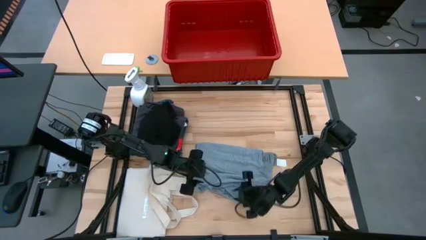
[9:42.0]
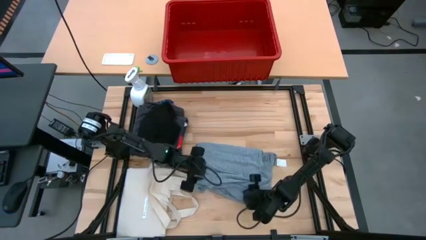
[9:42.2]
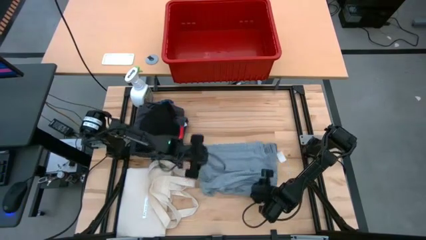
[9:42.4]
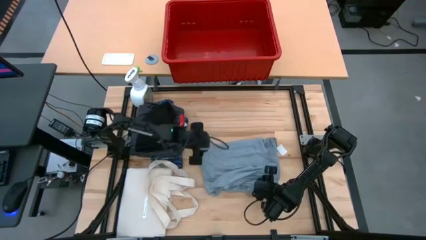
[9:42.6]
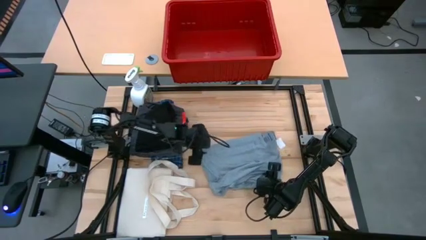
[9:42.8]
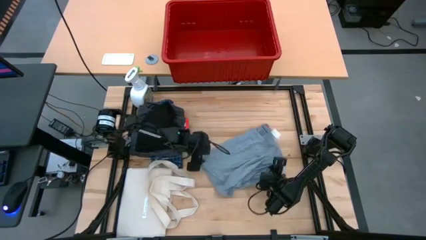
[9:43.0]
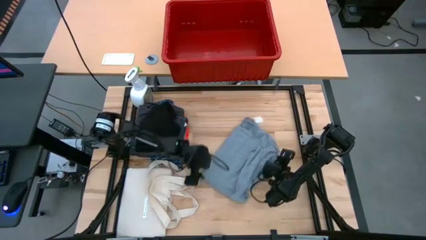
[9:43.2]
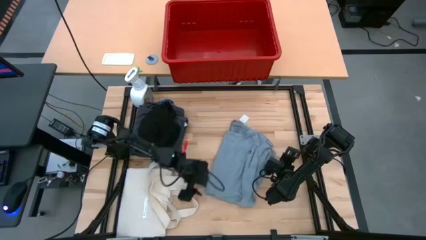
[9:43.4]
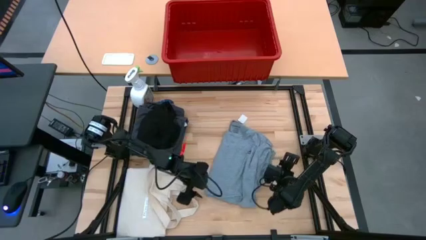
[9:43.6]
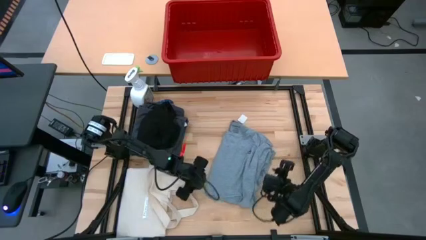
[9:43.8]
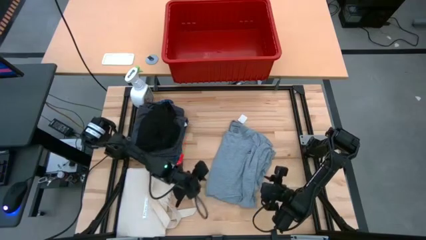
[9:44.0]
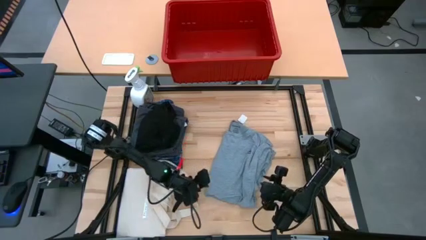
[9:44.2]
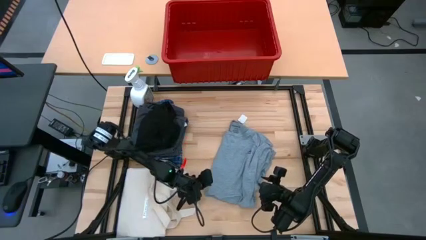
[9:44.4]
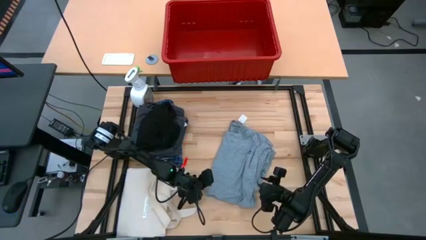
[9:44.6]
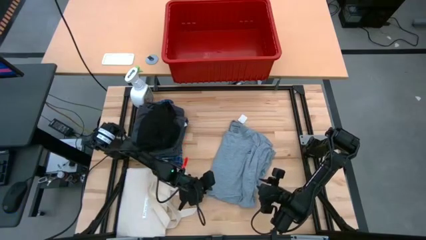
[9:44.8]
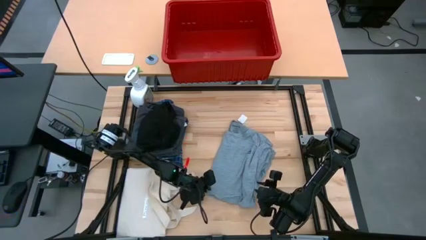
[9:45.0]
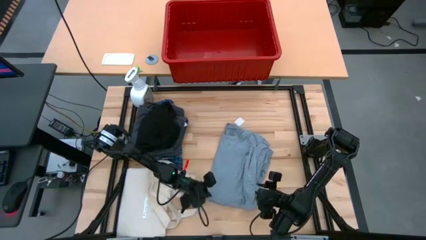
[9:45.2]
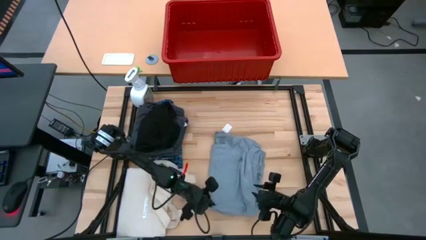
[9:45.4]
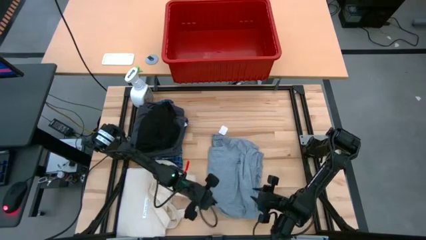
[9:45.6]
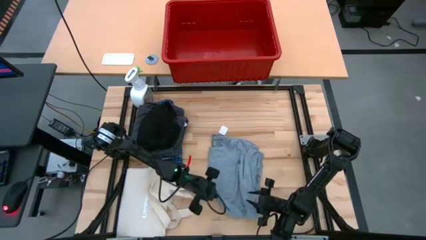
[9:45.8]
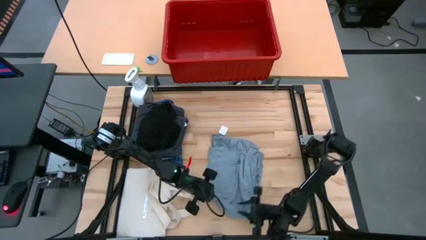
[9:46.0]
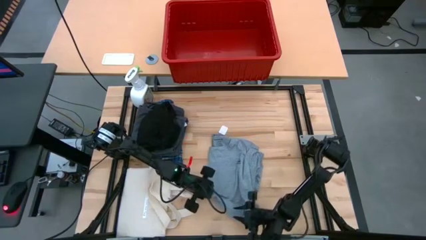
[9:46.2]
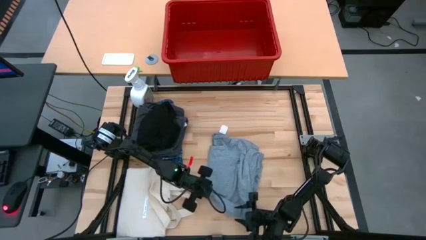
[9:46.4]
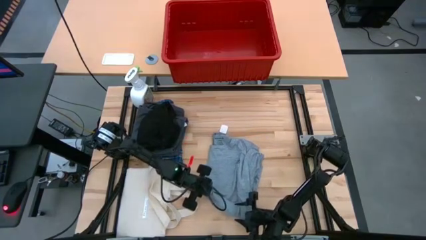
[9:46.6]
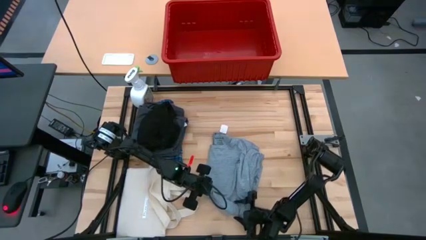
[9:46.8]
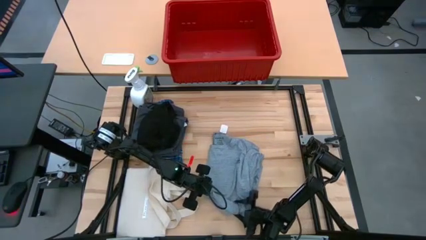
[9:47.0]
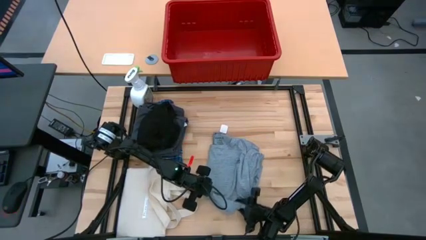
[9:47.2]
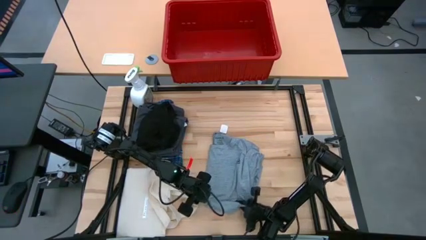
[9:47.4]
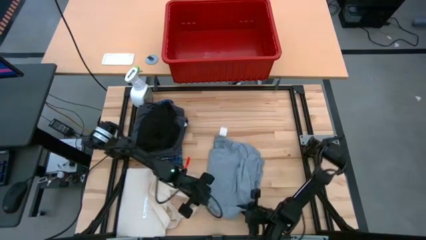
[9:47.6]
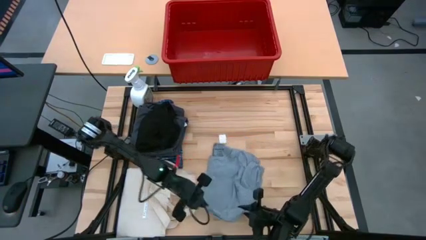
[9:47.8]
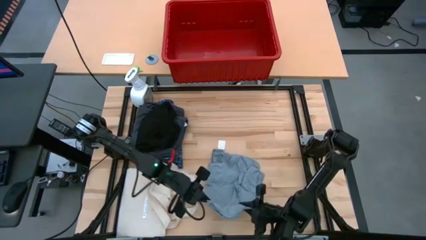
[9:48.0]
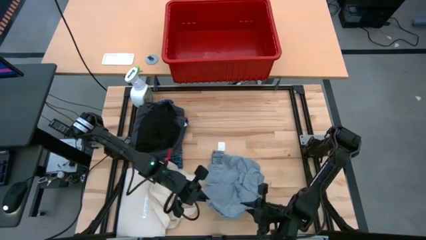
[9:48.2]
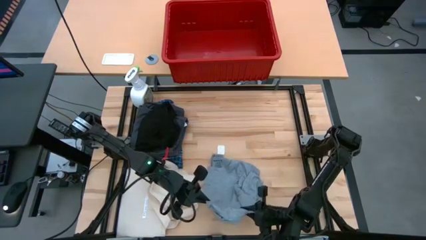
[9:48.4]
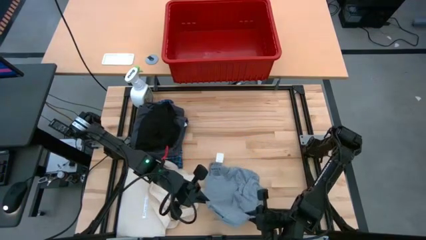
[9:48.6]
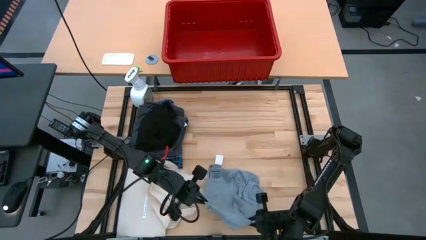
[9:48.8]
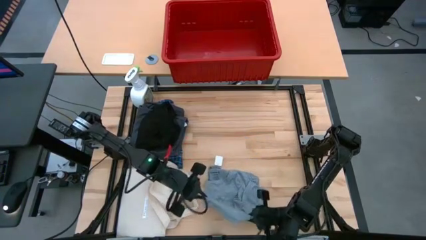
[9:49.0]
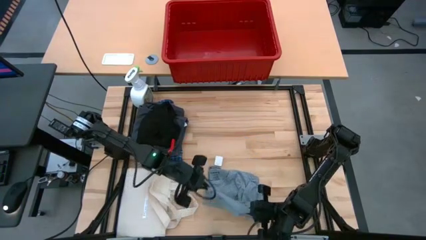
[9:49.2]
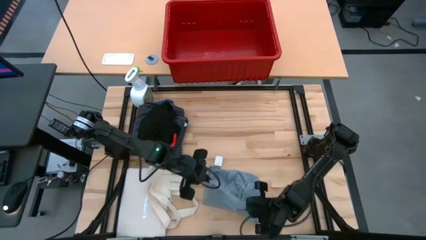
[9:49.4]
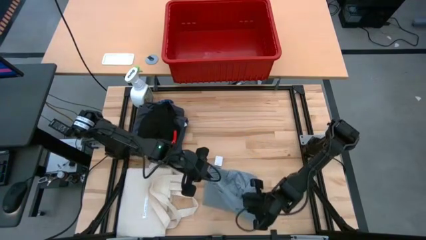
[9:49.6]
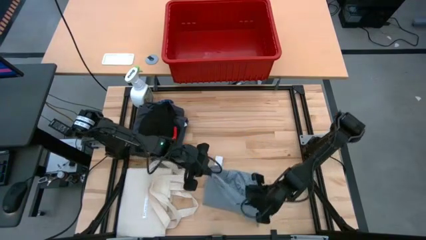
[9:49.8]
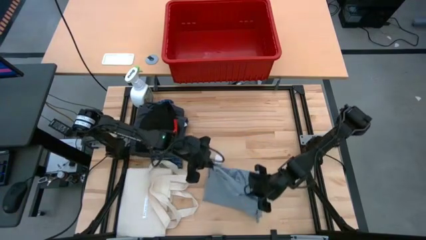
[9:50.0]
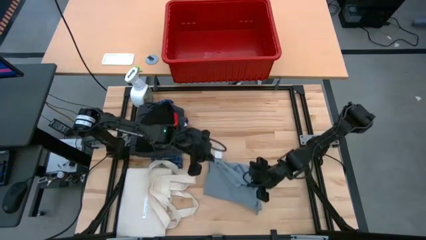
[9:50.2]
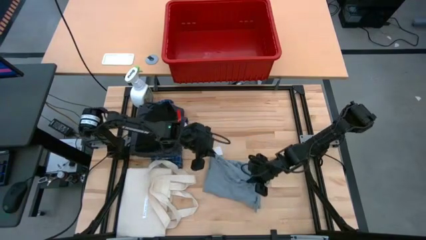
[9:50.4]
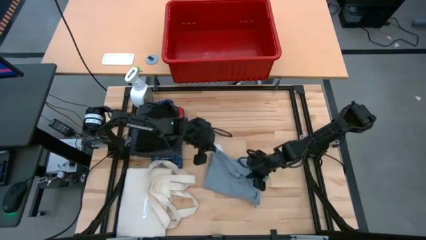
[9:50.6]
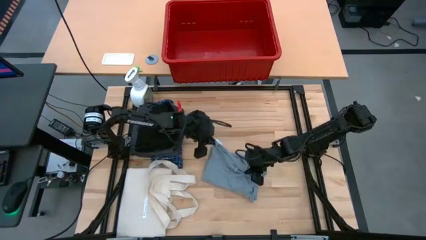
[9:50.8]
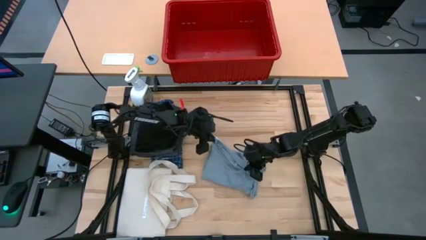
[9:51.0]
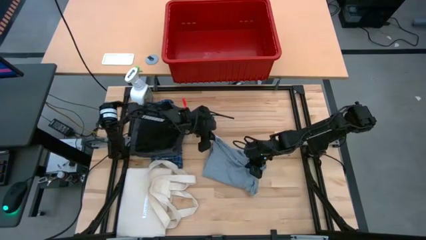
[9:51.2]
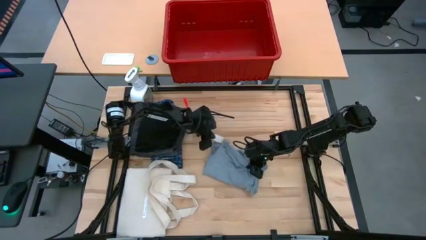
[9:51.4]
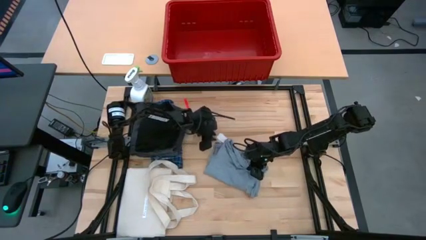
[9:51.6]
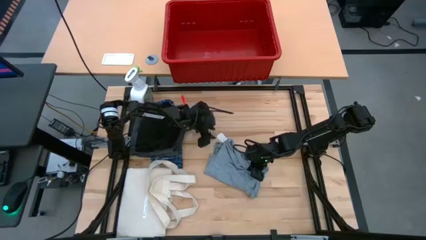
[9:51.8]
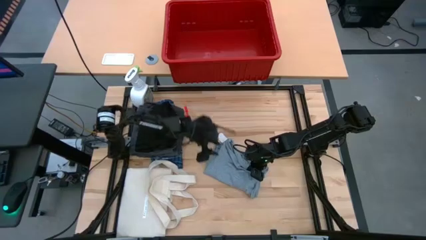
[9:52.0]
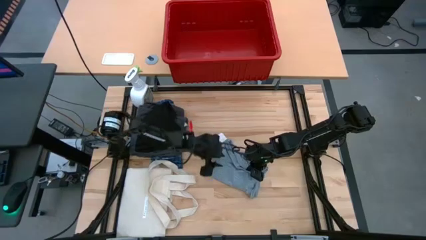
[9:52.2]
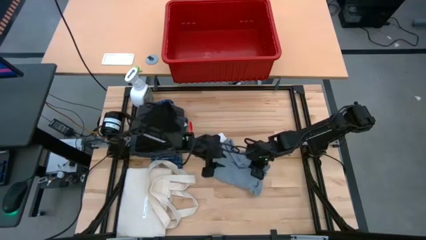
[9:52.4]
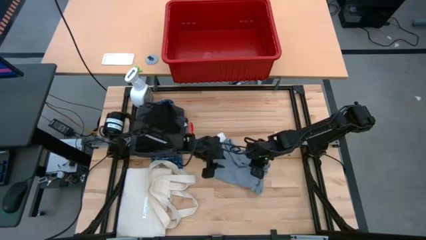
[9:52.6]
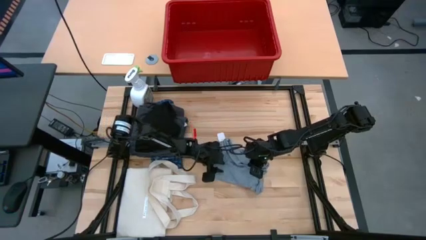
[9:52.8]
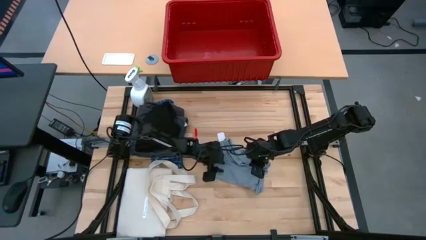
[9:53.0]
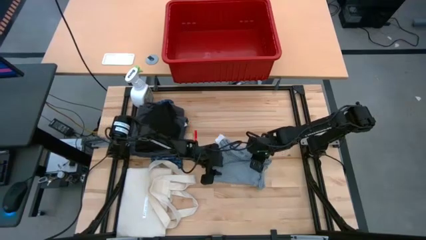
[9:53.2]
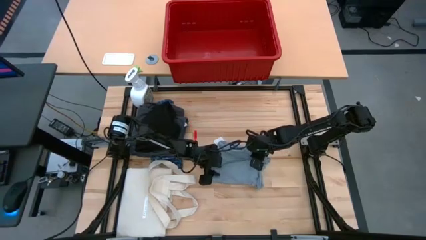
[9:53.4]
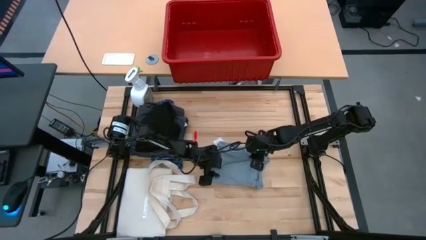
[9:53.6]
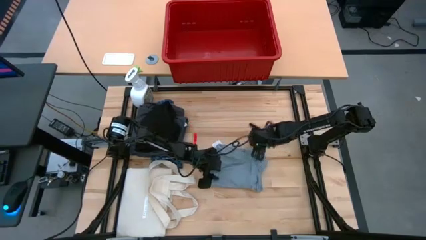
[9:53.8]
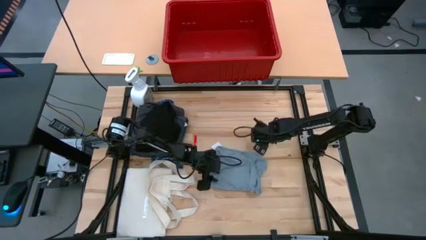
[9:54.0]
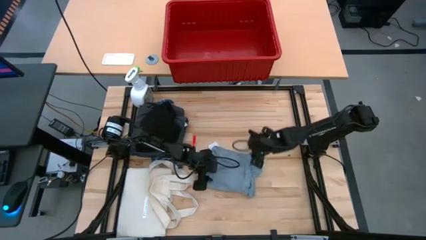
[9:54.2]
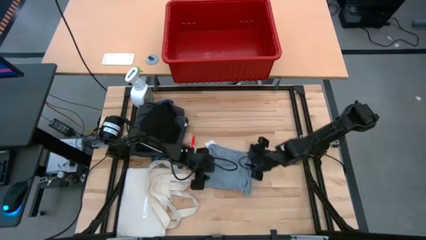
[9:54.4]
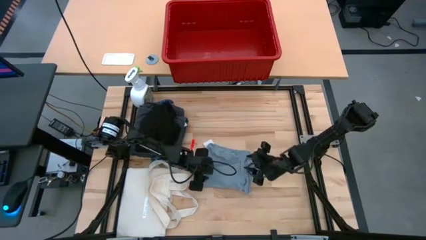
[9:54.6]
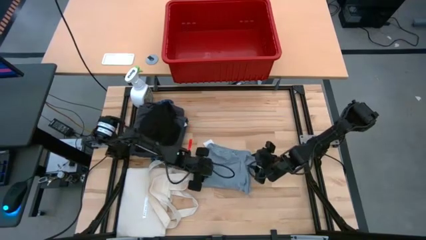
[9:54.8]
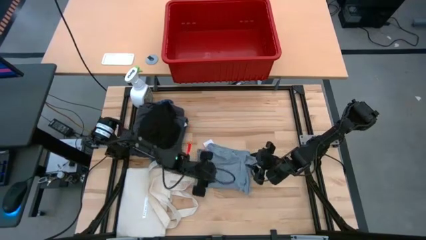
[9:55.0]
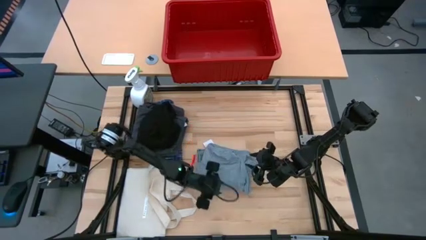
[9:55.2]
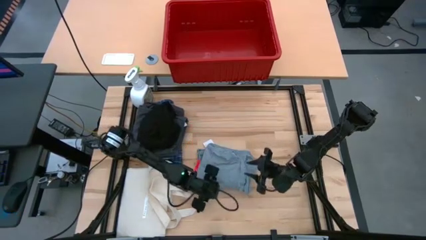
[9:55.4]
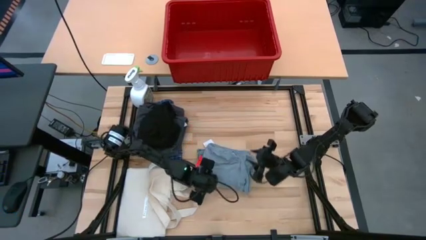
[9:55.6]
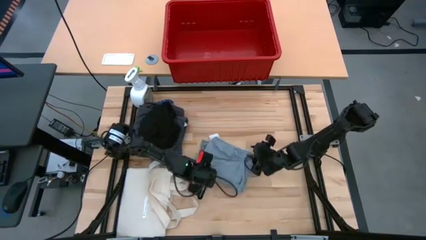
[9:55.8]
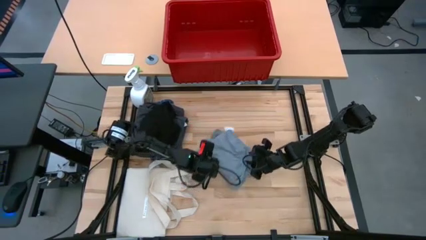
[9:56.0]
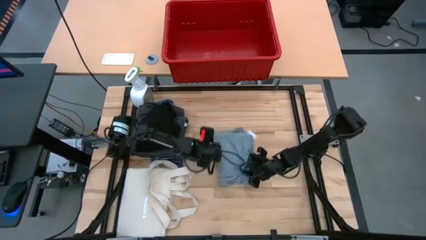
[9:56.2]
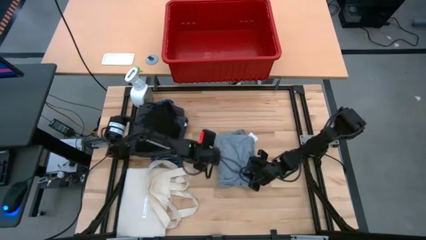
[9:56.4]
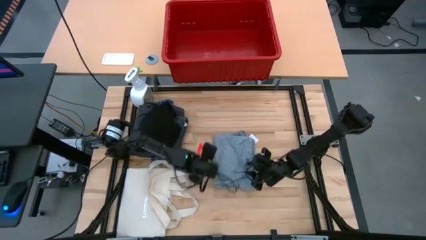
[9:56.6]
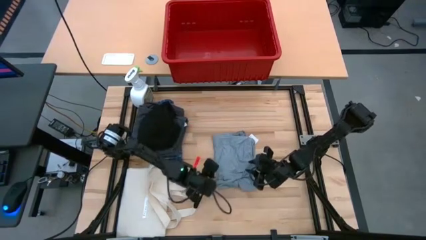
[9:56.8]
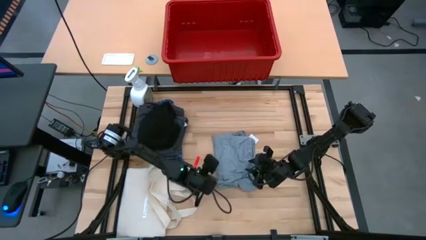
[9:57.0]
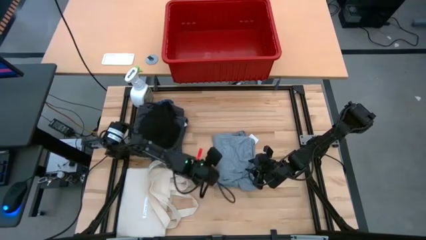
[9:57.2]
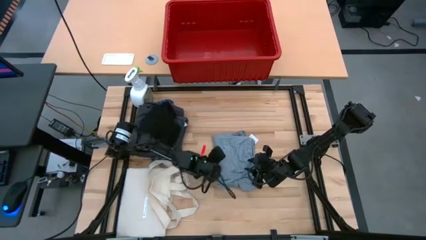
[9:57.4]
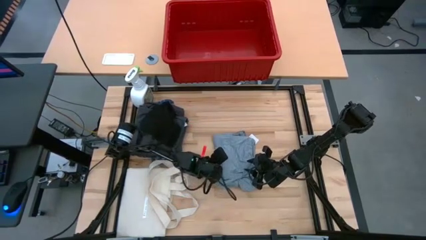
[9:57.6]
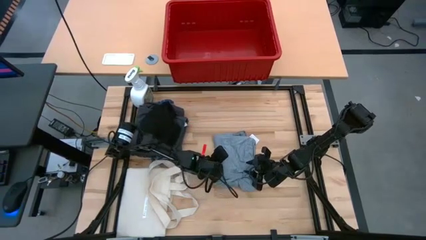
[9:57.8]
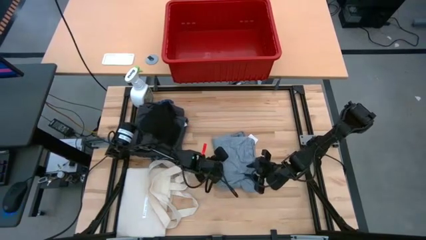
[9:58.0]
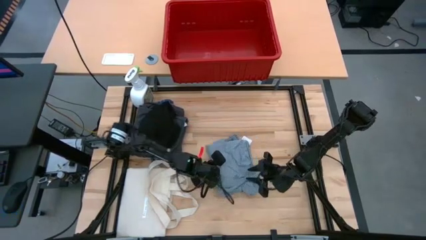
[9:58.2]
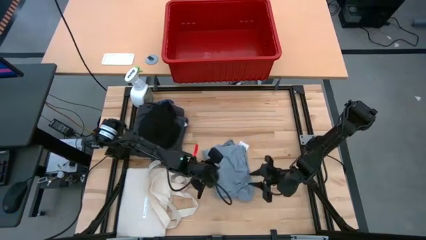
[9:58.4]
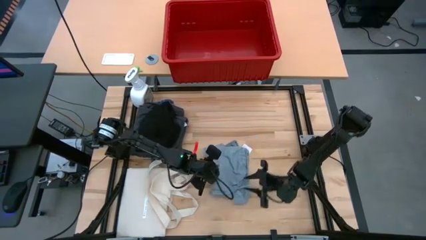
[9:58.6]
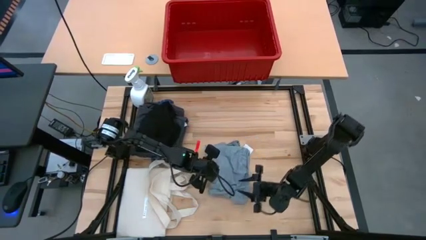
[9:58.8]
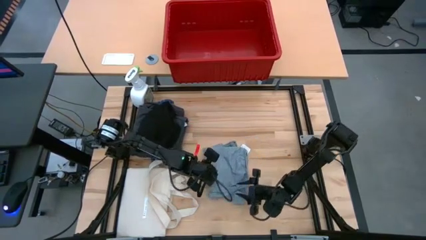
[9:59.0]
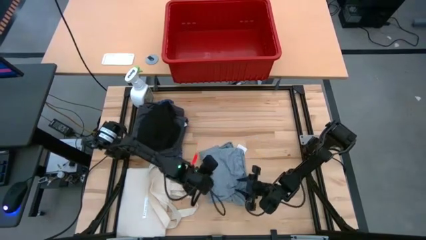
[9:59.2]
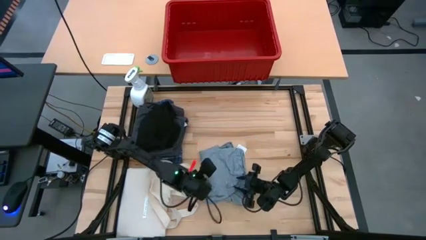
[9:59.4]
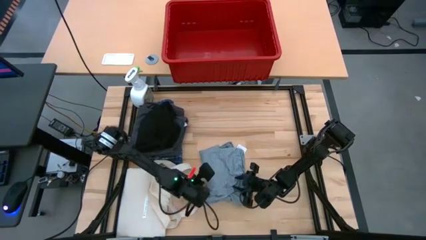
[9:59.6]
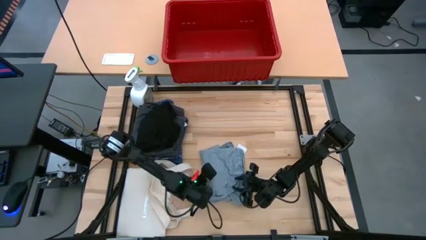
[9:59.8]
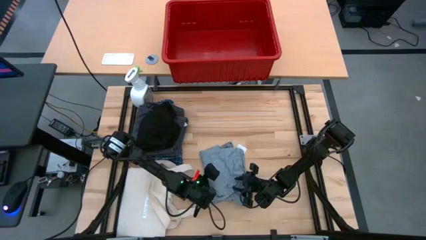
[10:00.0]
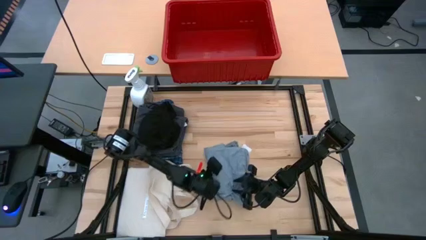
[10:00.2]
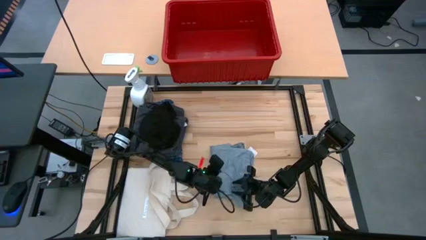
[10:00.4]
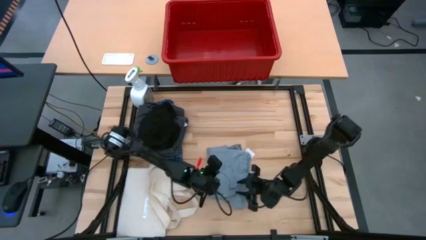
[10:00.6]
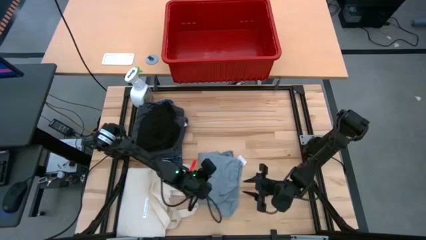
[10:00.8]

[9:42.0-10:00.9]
Task: Fold Laundry from Bin
Fold the gray shirt
